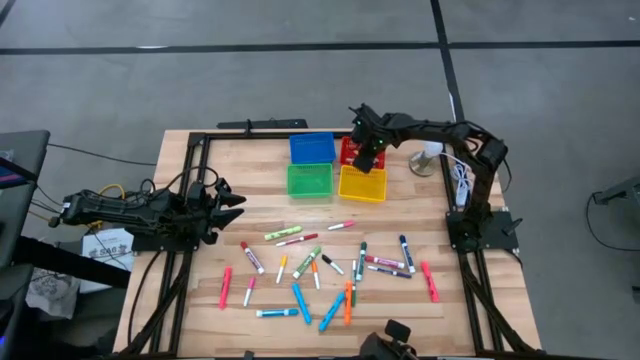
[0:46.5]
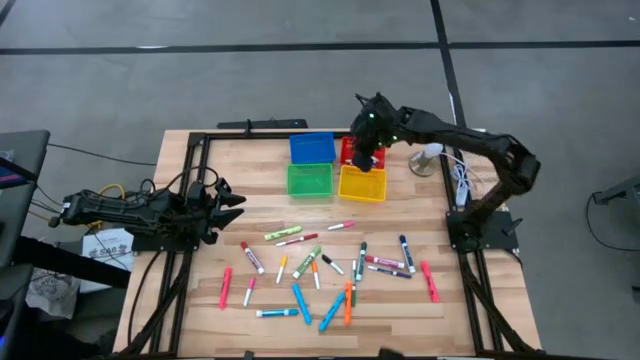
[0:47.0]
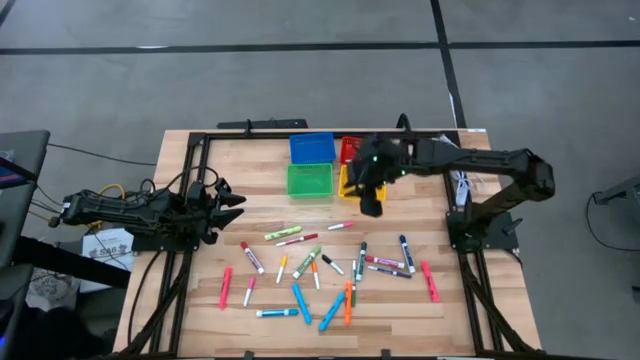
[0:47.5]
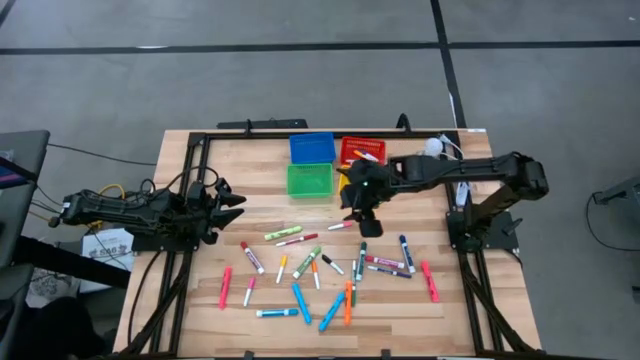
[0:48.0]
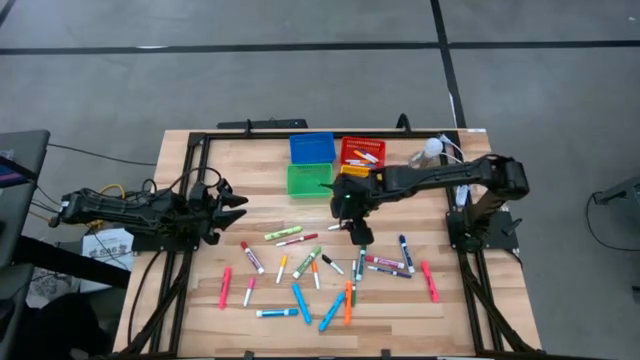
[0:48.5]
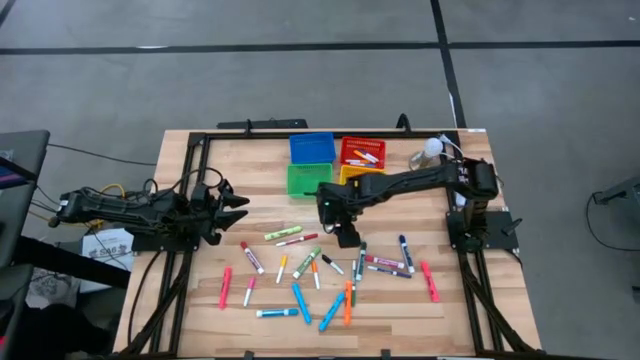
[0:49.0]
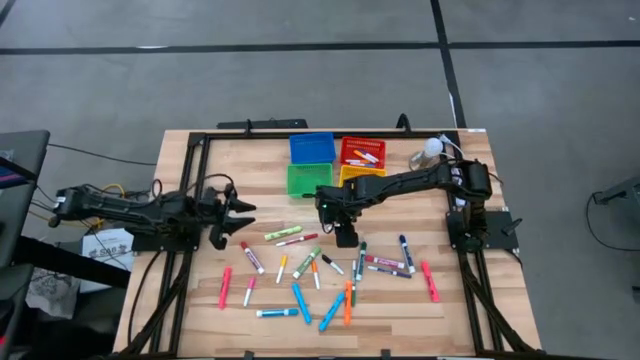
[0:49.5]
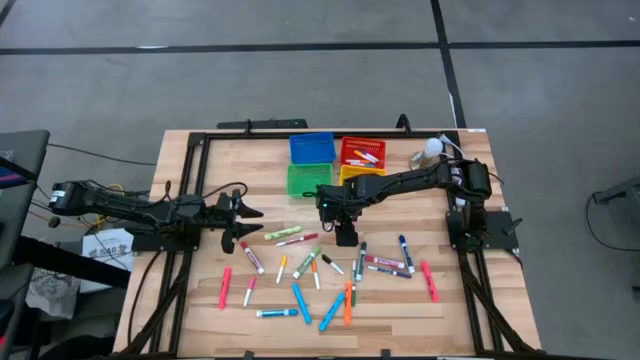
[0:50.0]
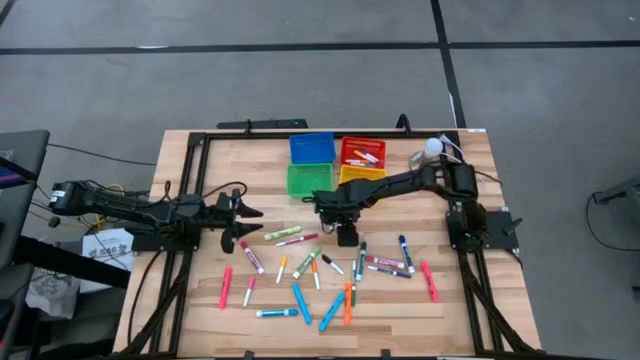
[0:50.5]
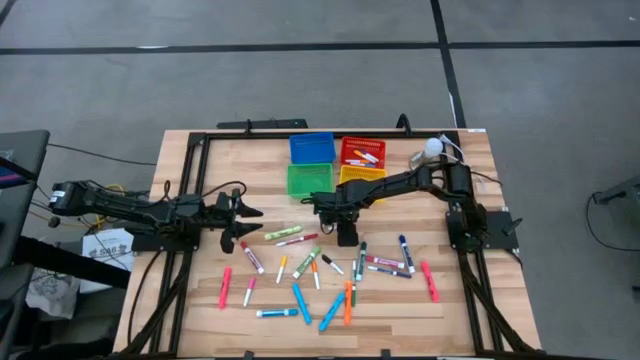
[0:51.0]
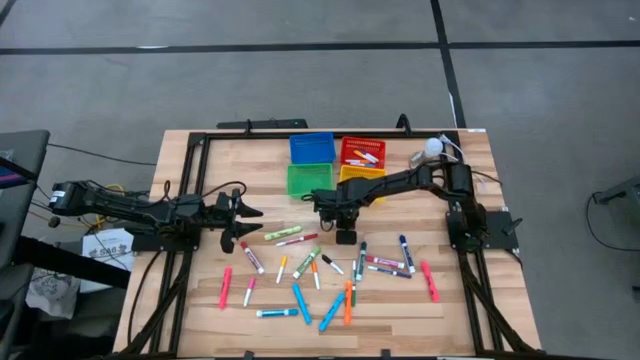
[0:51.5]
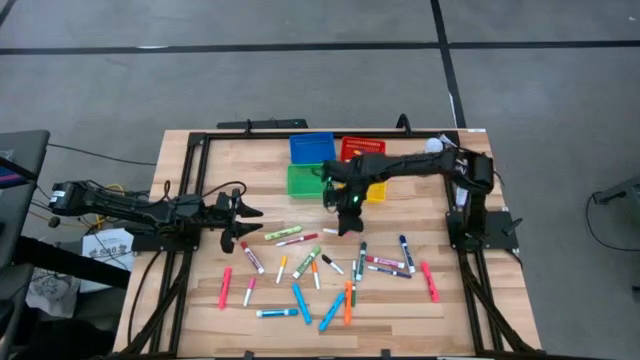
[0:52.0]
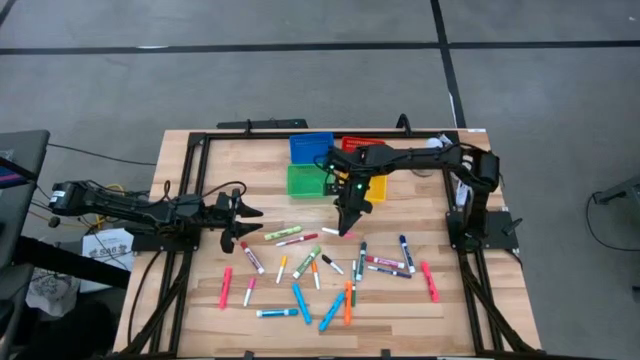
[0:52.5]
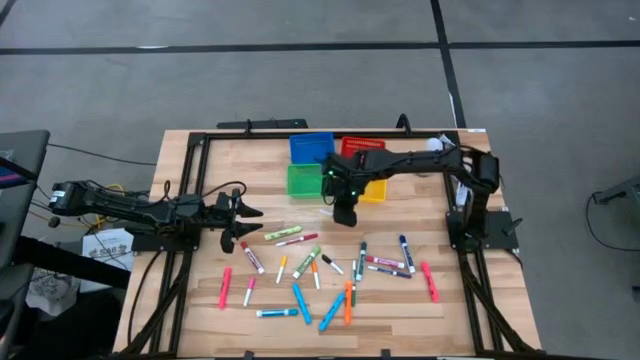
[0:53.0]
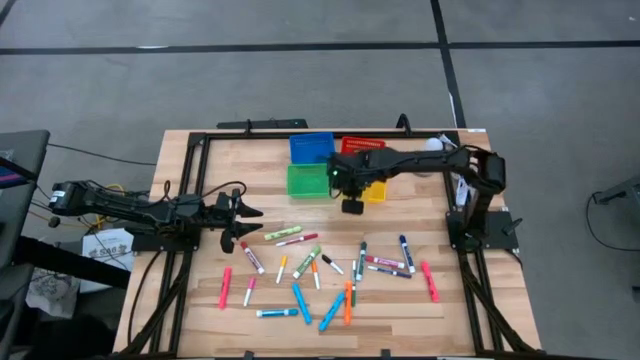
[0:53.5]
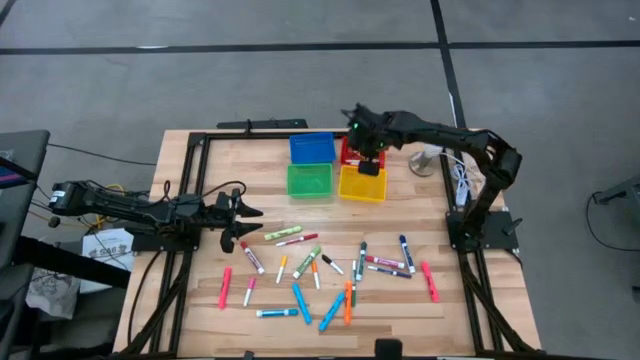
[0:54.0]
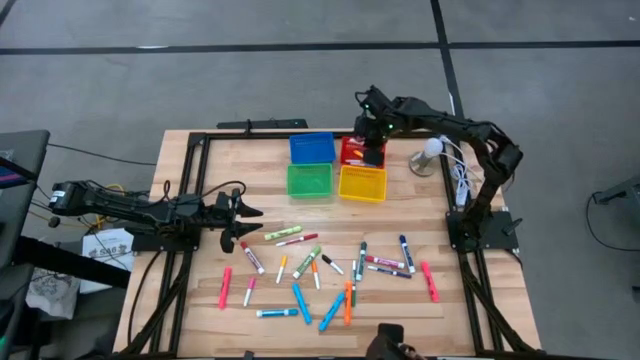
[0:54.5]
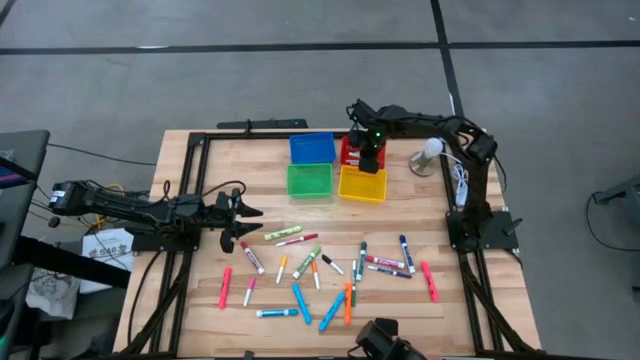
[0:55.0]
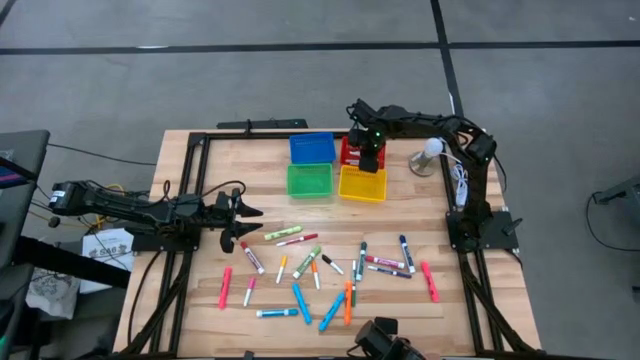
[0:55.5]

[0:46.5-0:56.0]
Task: Pick & Place Markers
Put the top pink highlighter into the red bin

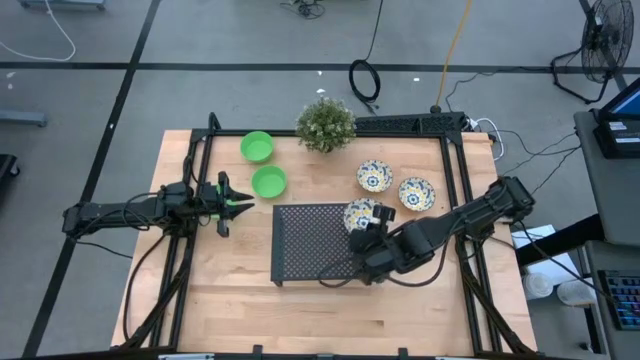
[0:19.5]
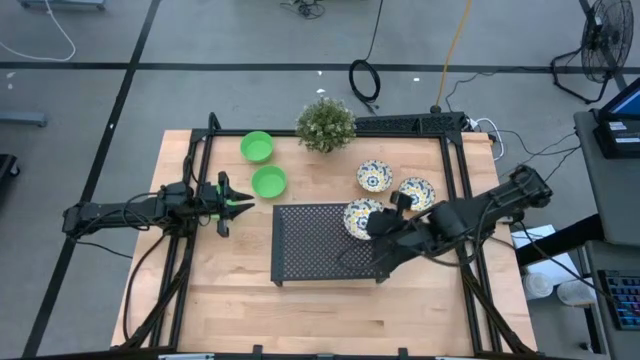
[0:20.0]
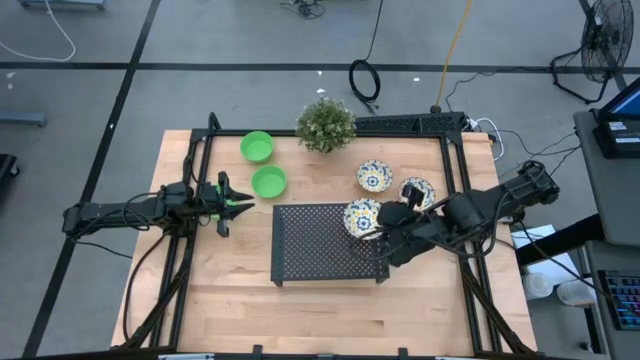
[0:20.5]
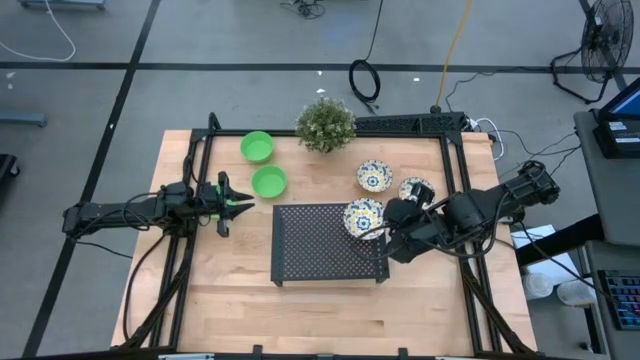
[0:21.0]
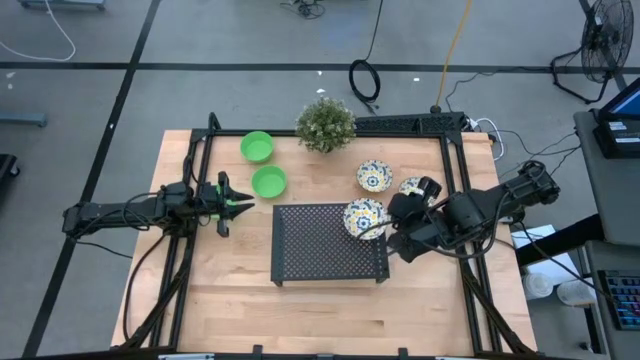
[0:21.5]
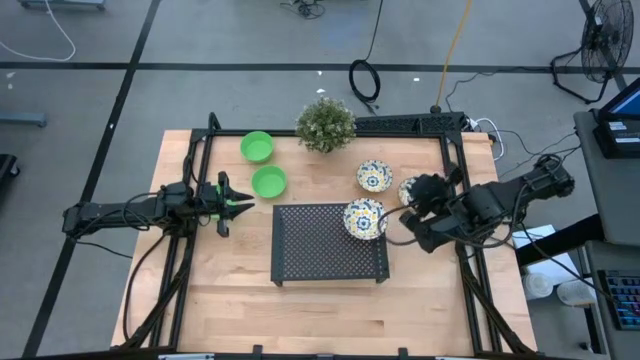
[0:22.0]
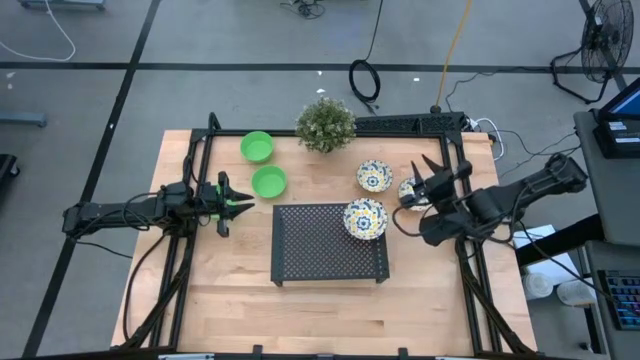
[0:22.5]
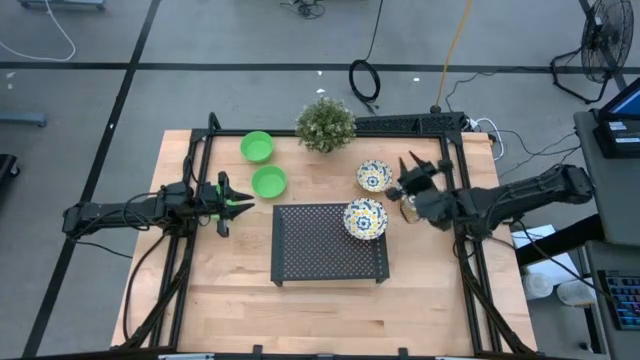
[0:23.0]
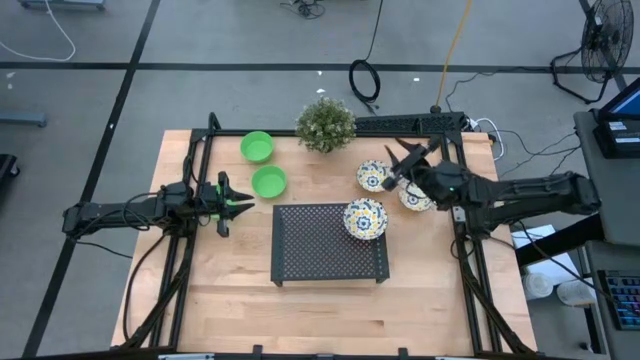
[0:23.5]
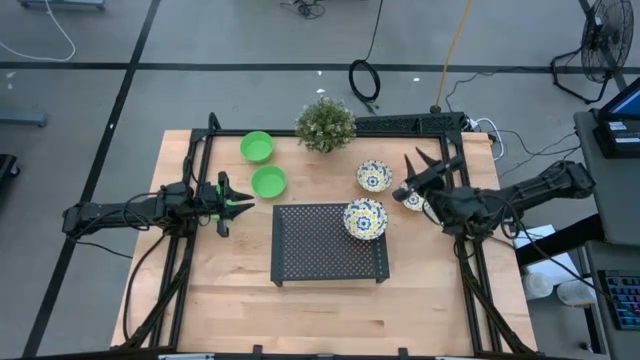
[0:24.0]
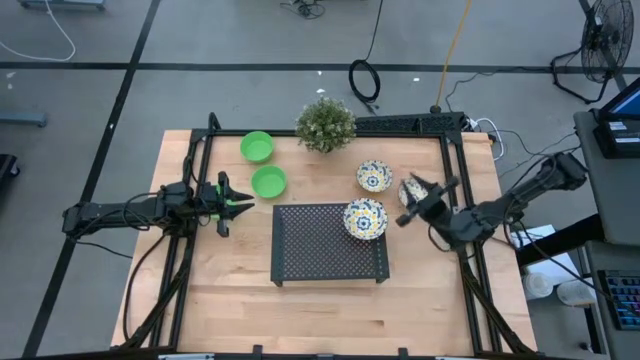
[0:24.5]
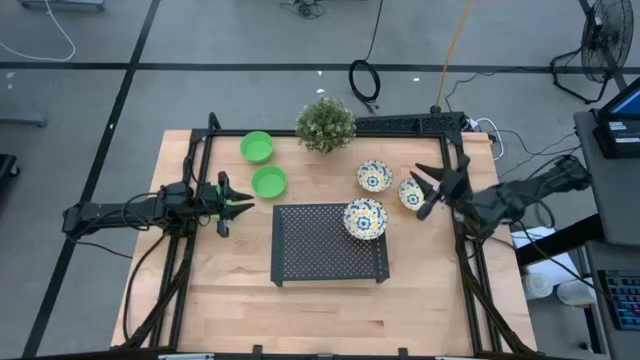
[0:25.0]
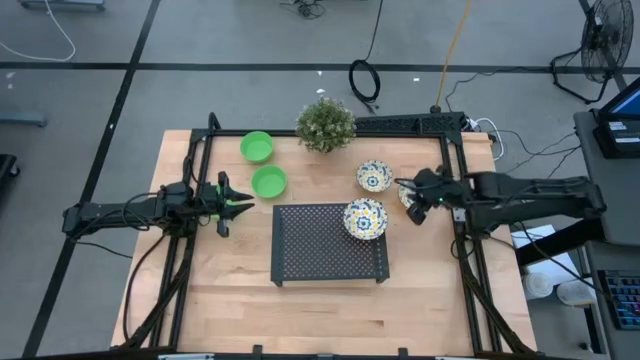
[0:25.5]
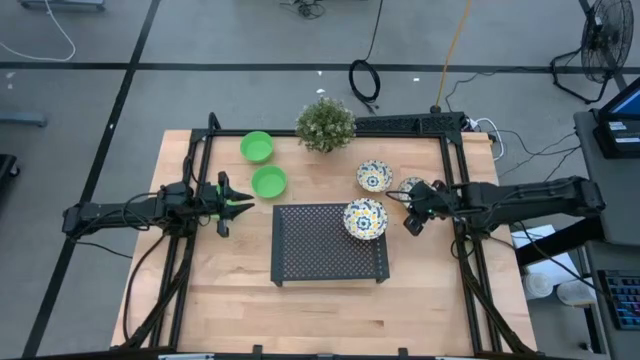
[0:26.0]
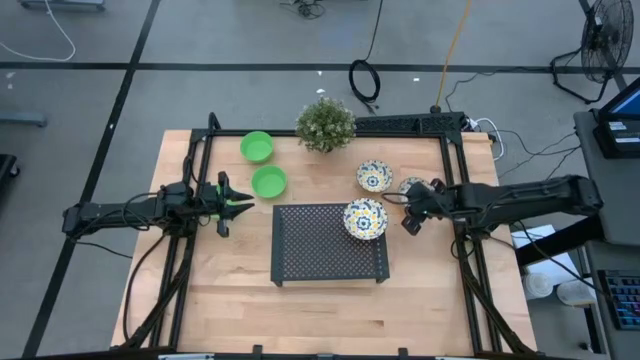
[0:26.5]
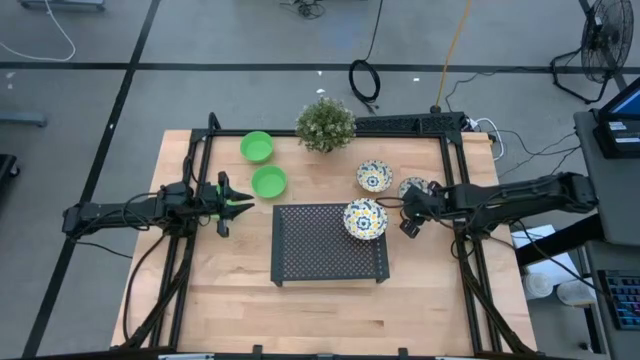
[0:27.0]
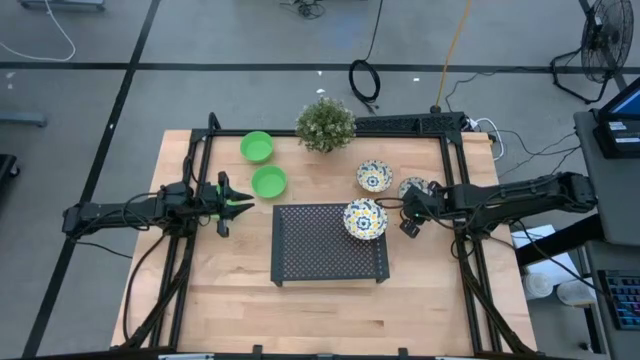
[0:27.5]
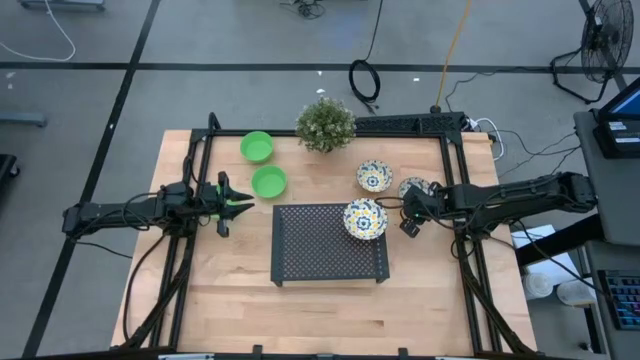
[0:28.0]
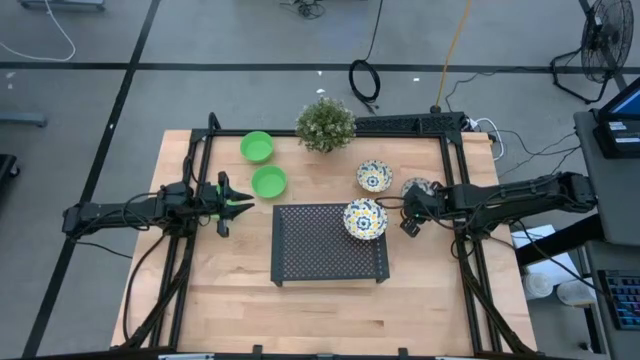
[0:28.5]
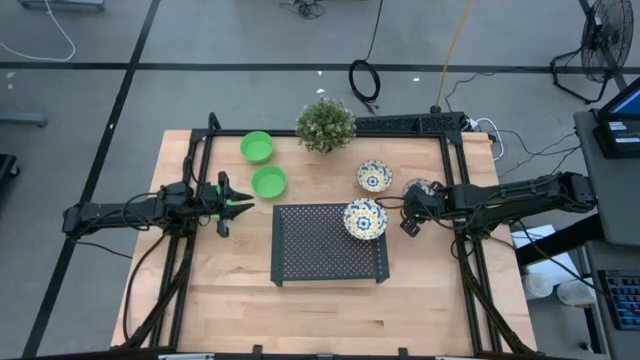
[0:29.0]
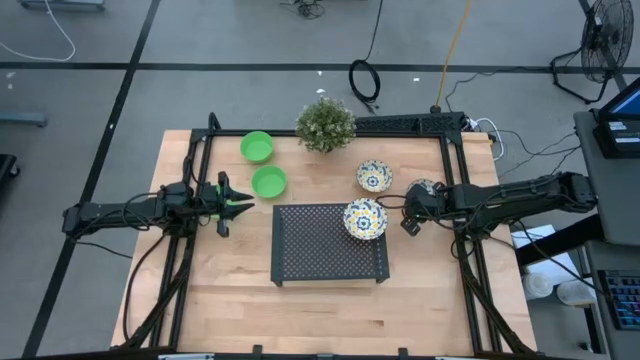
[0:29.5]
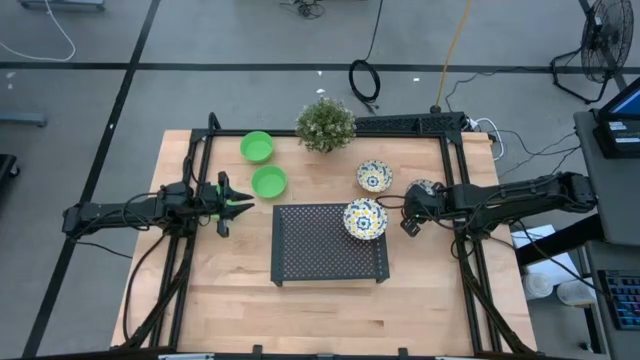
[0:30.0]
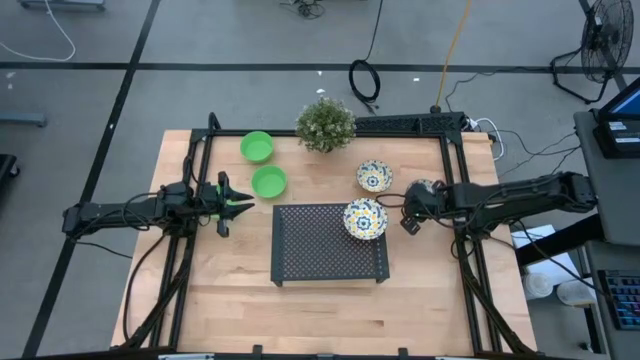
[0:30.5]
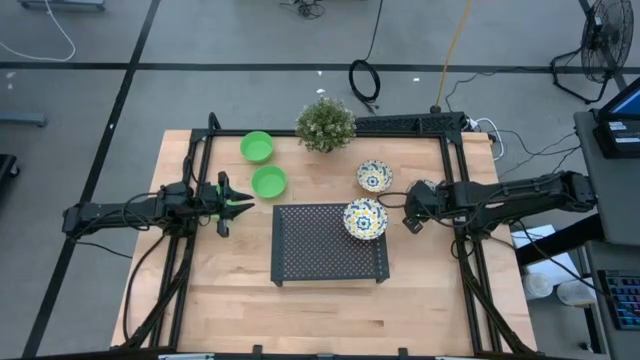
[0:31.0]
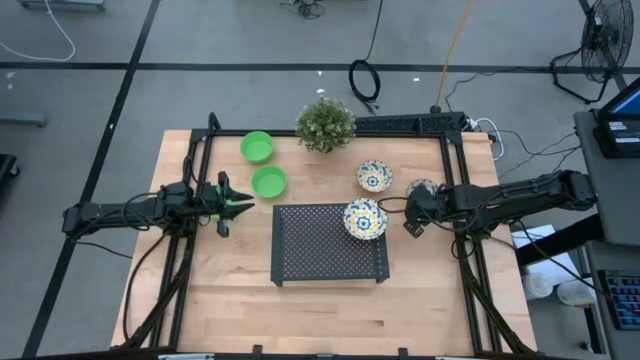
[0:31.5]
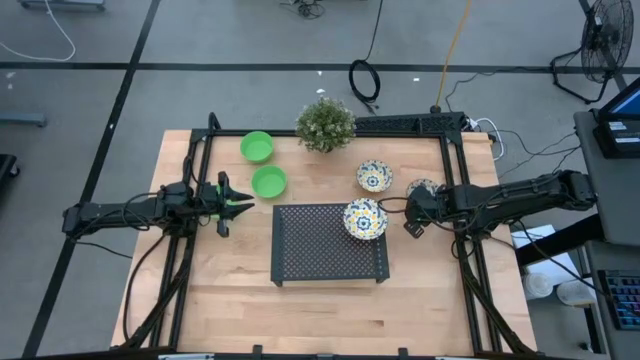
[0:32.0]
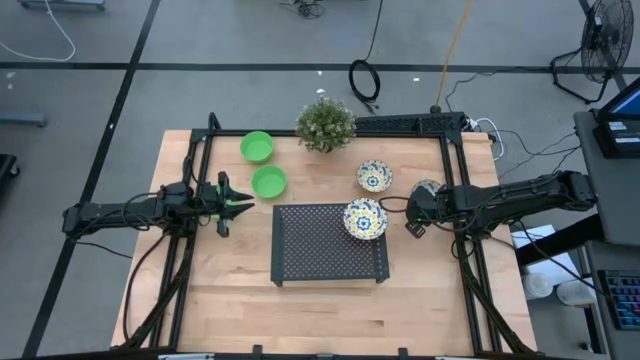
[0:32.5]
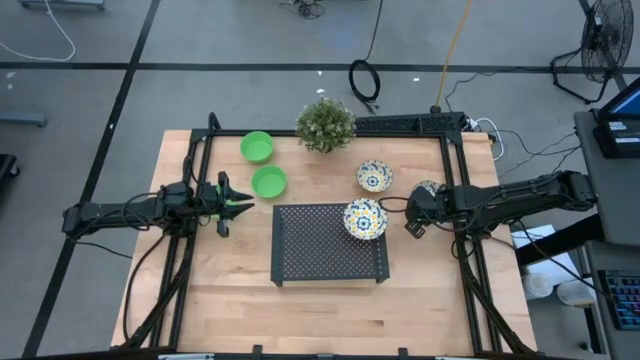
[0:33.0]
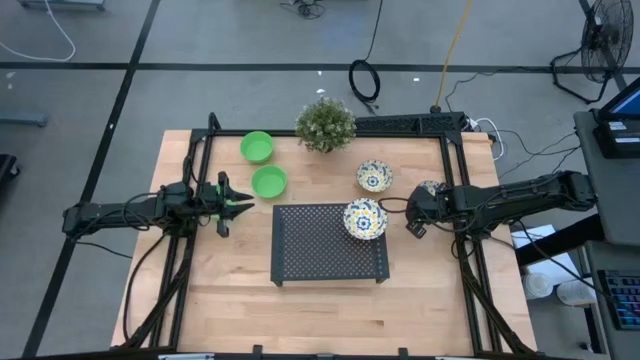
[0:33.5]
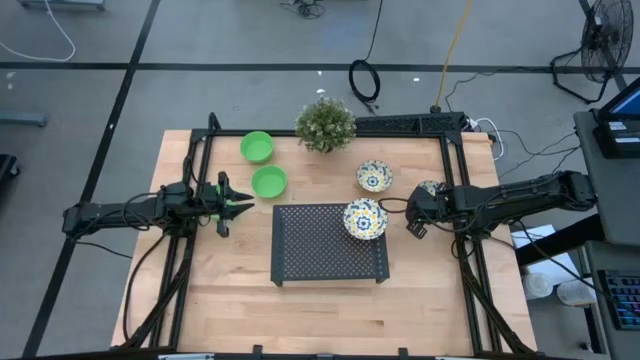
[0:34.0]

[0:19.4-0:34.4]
Task: Pick & Place Mini bowls
Stack the right white patterned bowl on top of the white patterned bowl on the shelf
